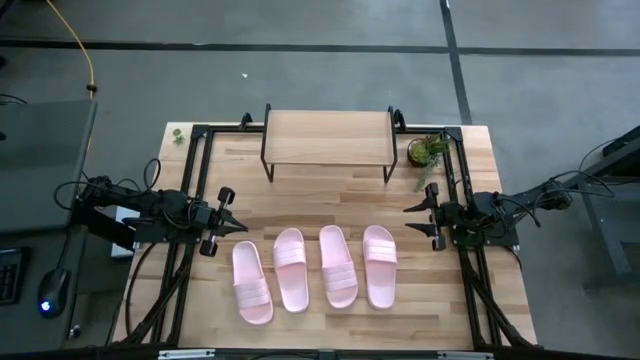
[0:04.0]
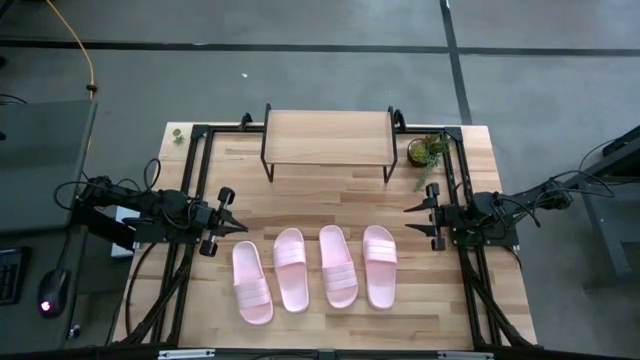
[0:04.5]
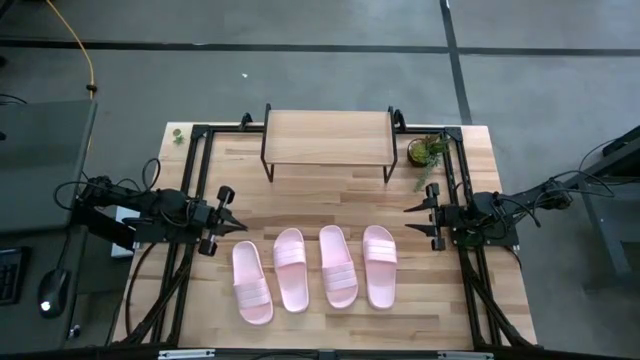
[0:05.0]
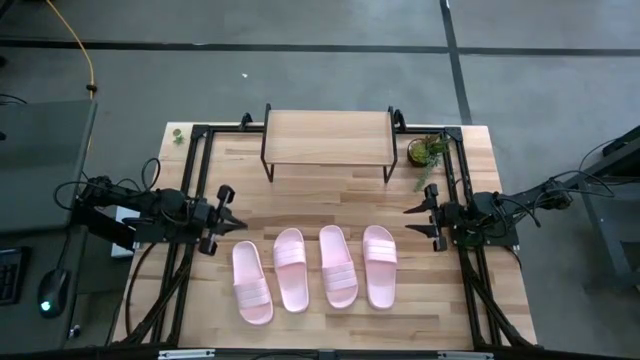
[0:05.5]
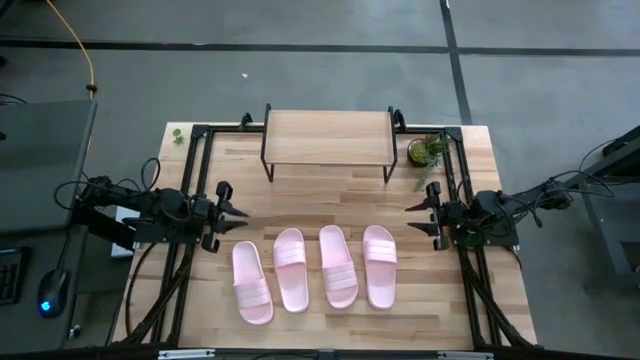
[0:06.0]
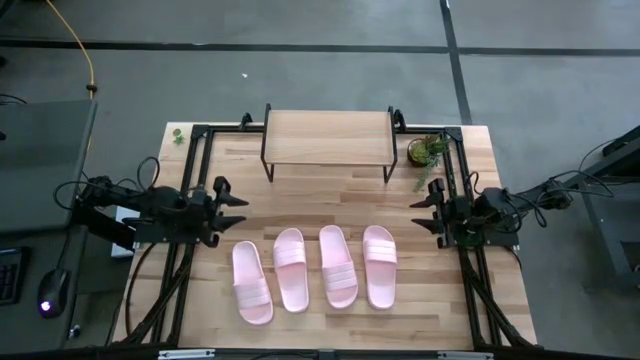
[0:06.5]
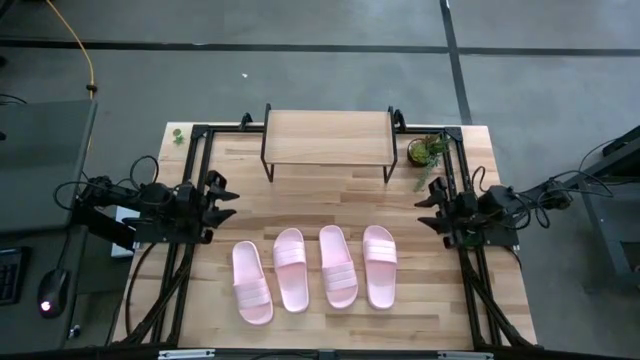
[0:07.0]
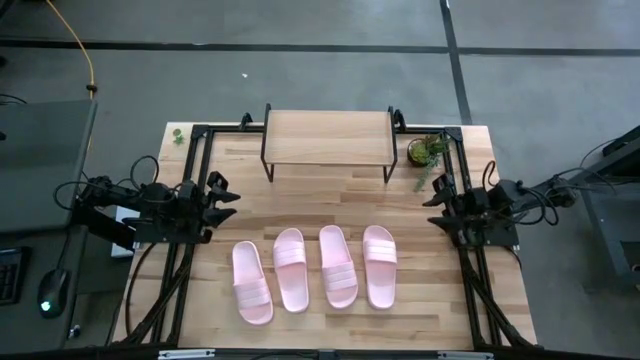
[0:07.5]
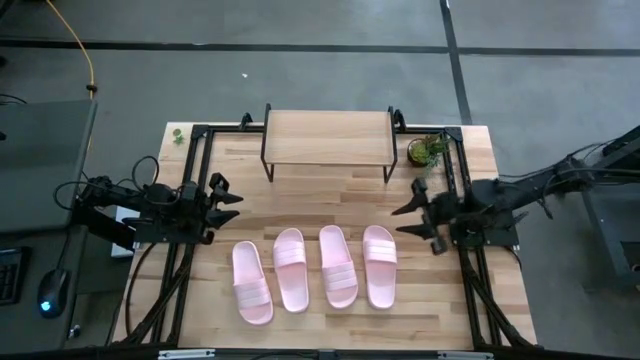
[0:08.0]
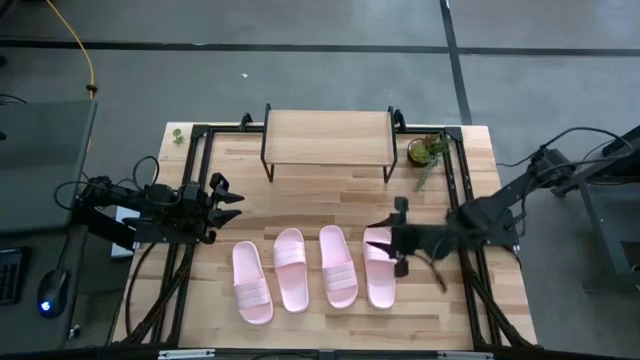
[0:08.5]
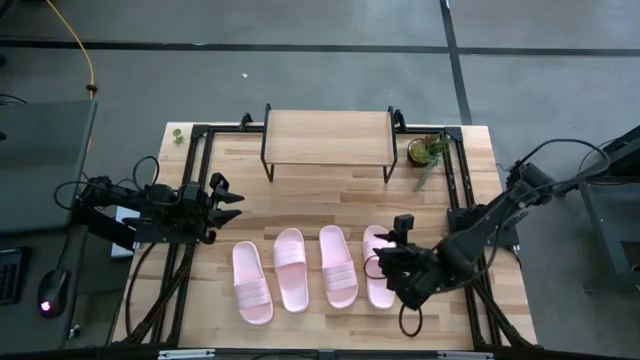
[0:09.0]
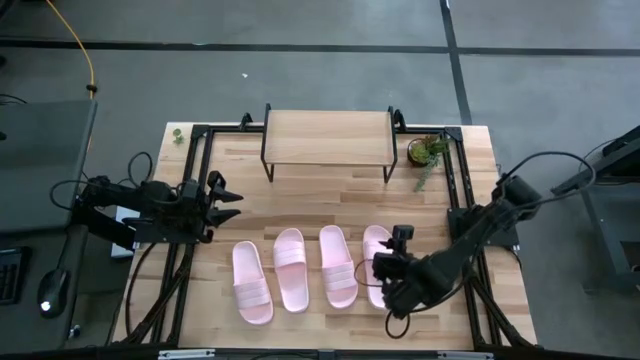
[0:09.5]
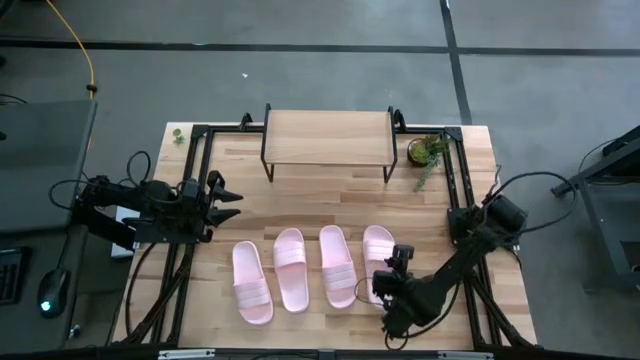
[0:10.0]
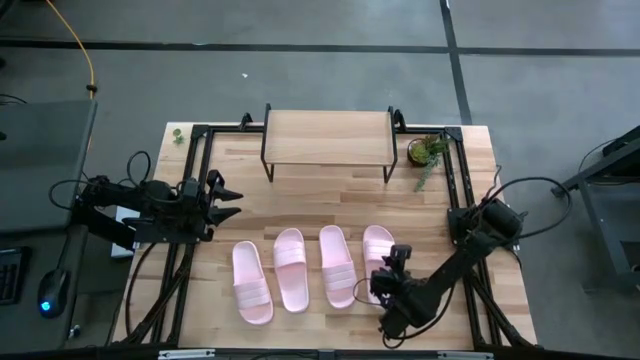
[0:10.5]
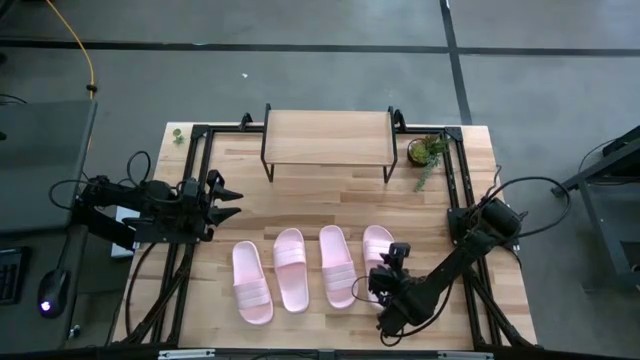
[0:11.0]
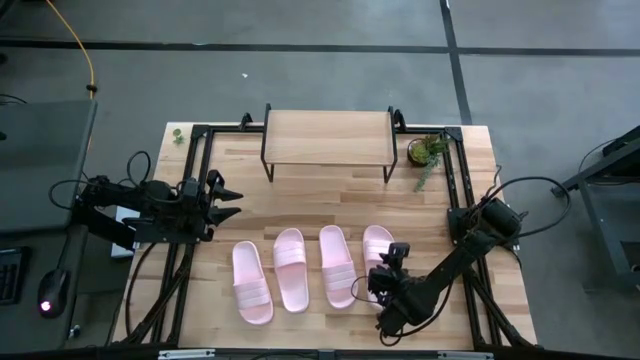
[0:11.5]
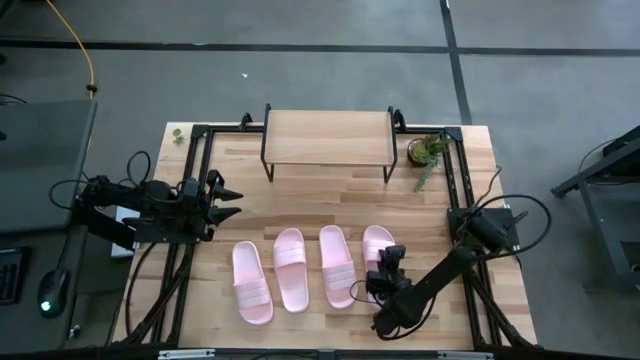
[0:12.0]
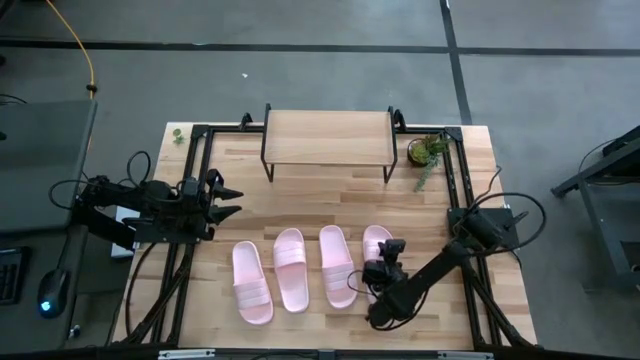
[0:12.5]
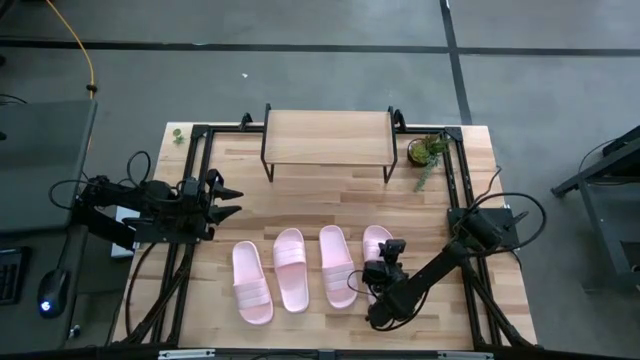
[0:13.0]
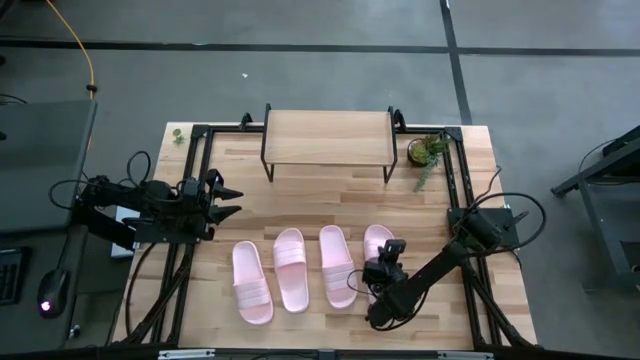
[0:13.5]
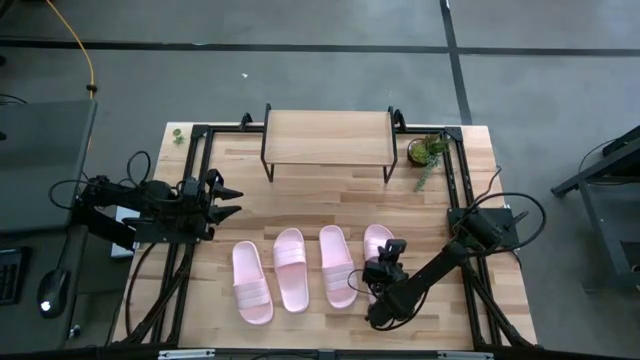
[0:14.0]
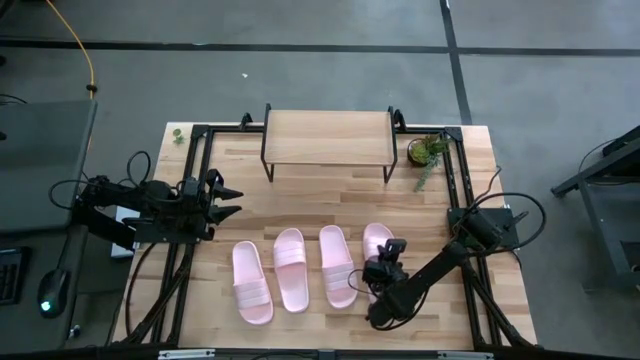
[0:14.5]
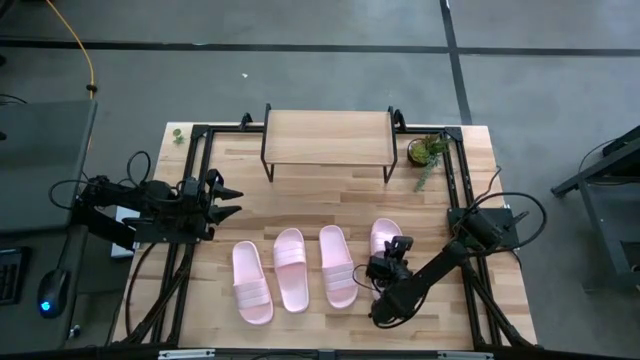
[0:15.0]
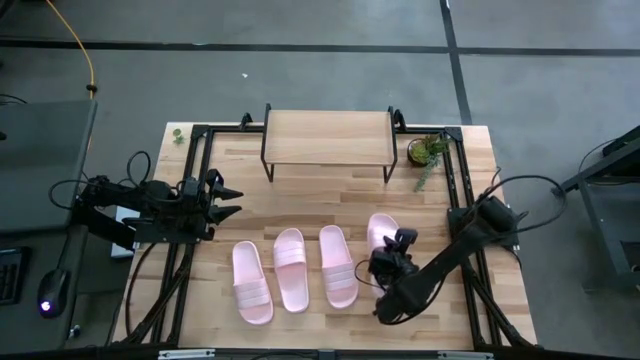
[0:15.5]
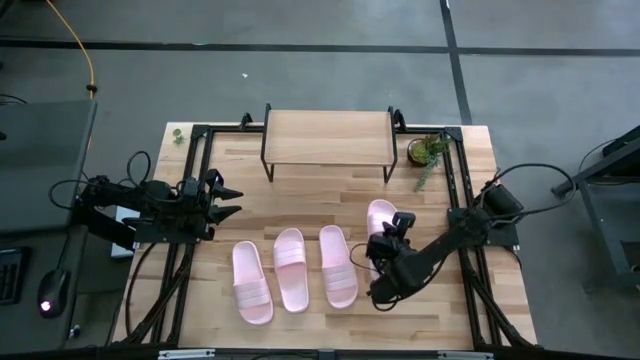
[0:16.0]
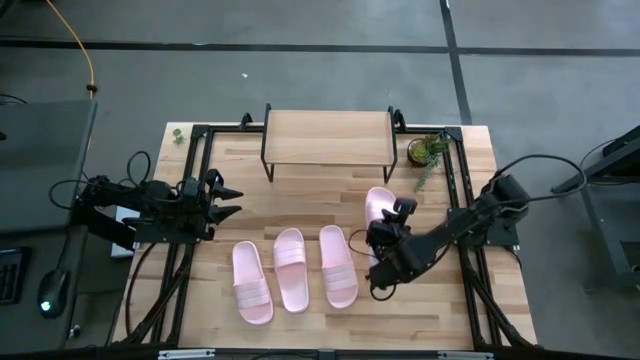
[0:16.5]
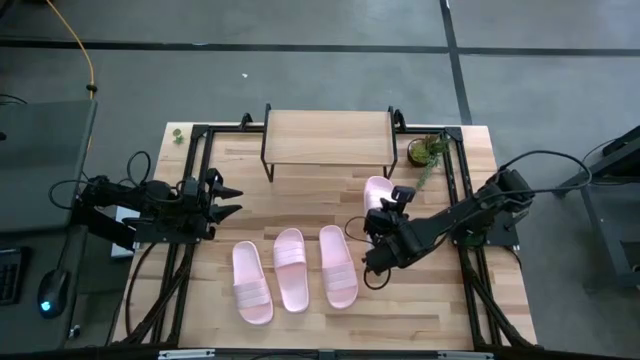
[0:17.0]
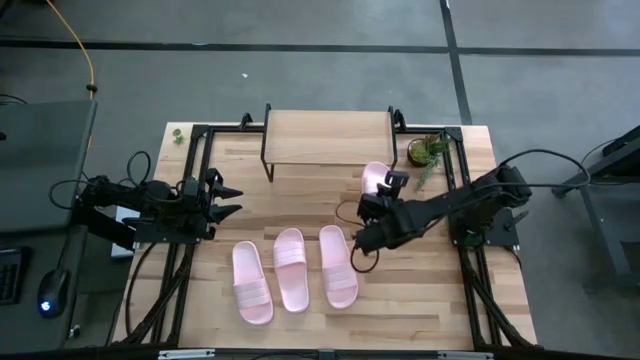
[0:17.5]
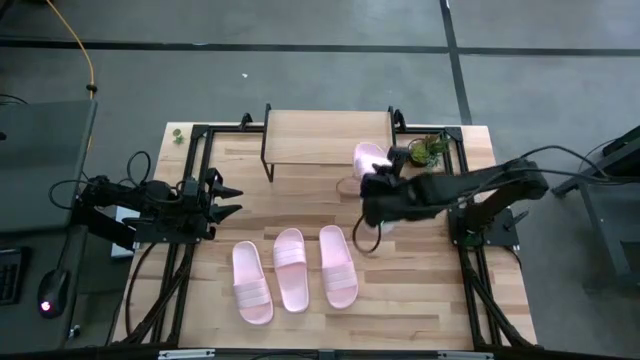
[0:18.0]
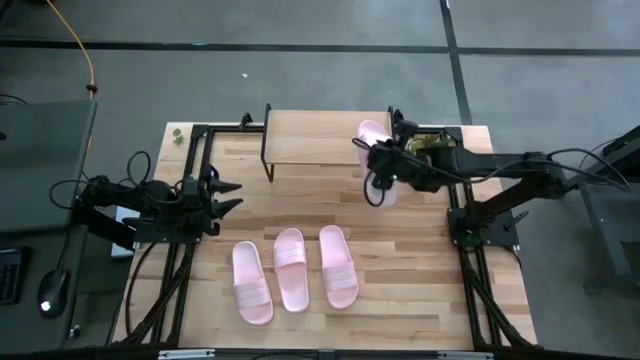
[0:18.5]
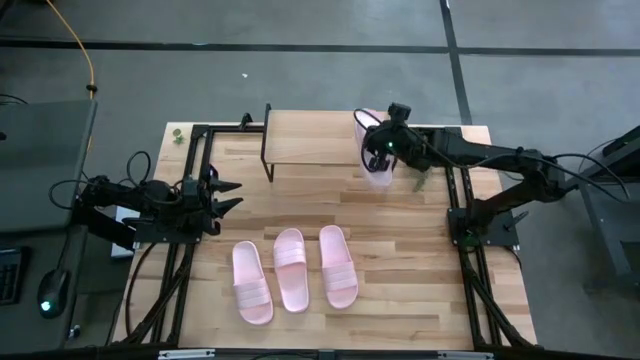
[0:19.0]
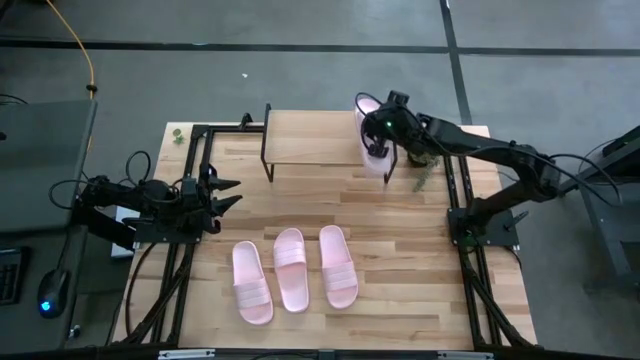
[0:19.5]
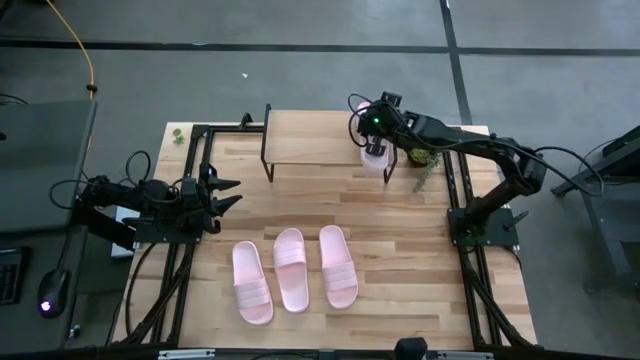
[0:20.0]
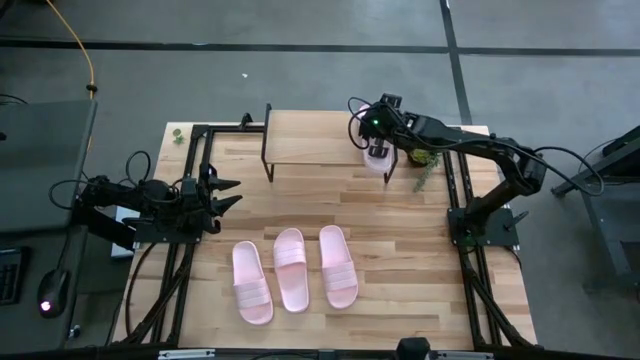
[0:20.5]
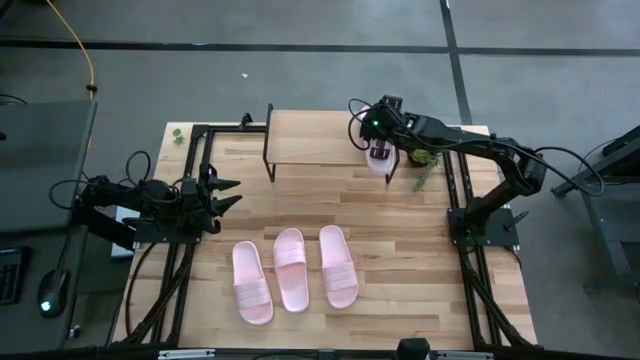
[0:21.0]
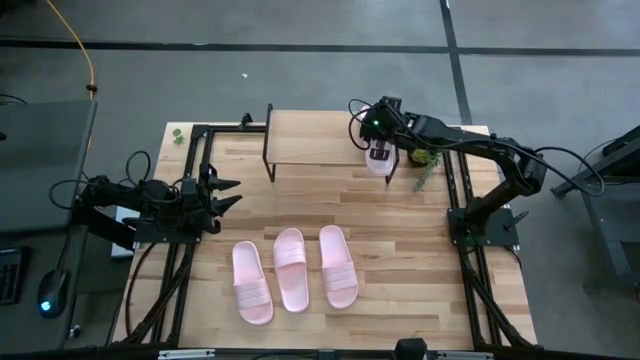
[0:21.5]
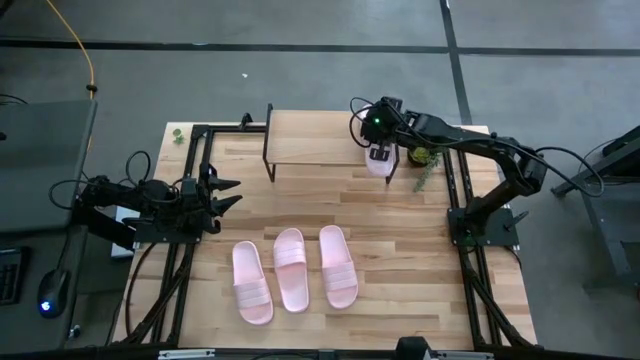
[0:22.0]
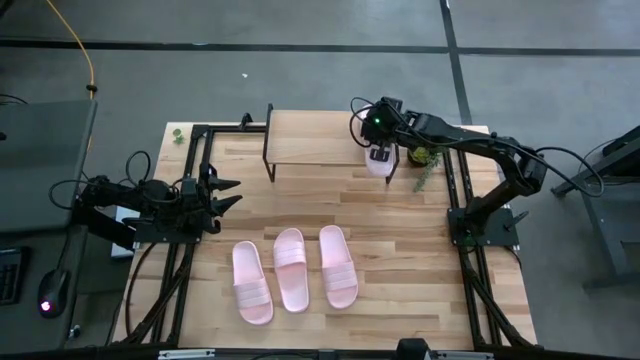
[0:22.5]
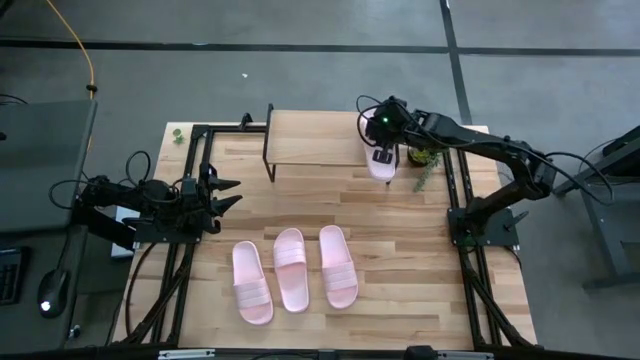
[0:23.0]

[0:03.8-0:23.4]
Task: Pick and place slides into the shelf
Put the pink slide on the shelf
